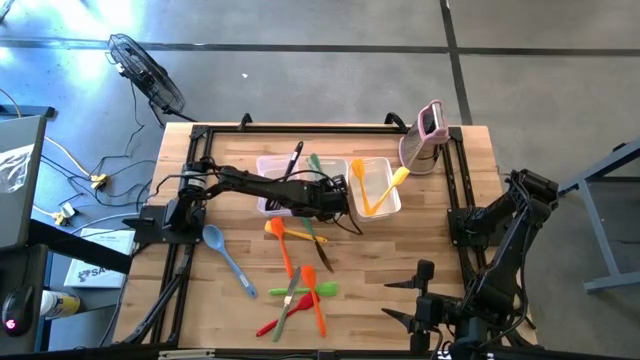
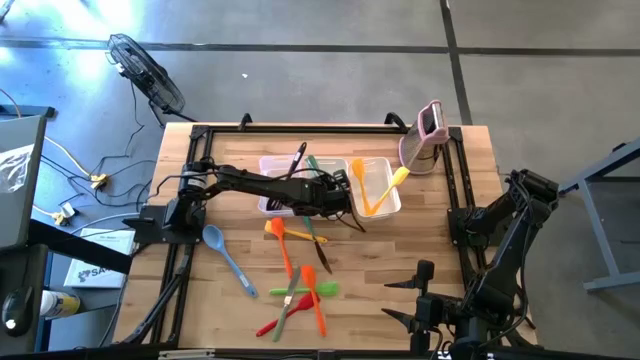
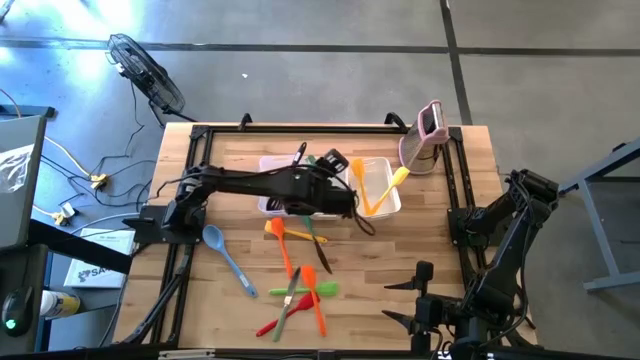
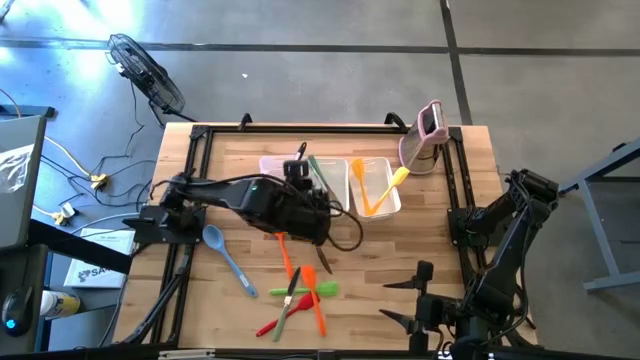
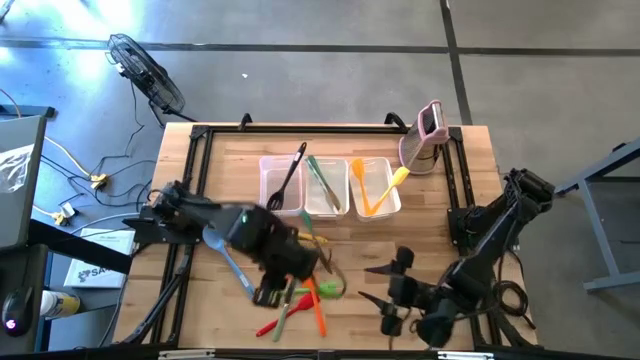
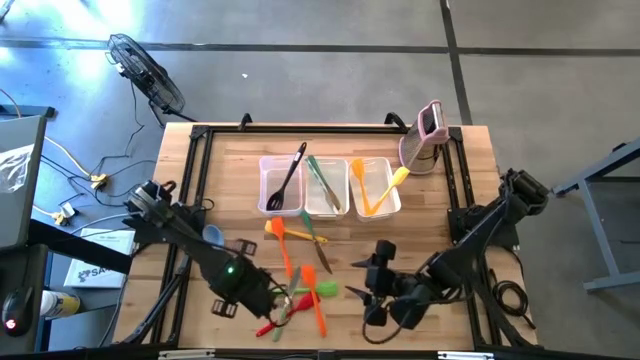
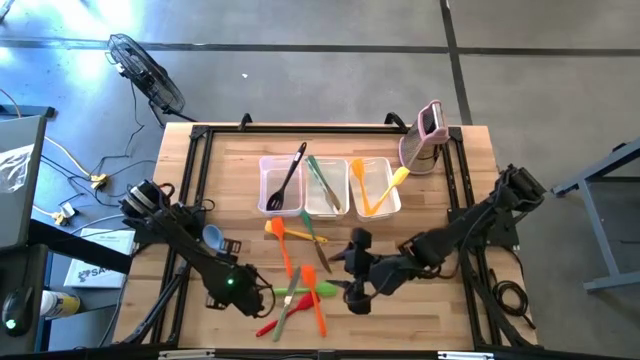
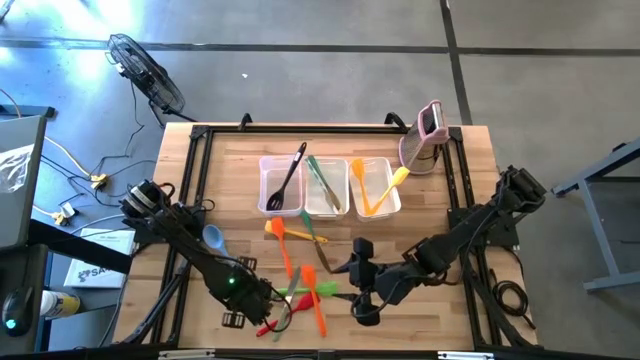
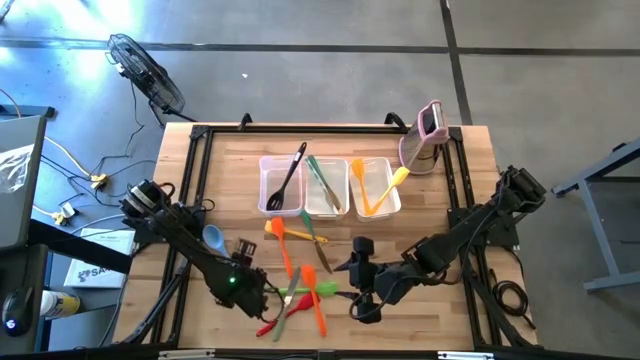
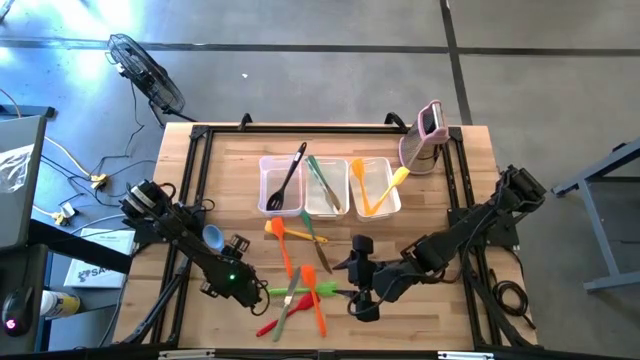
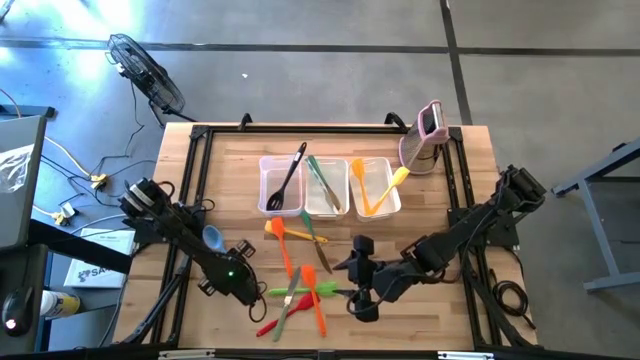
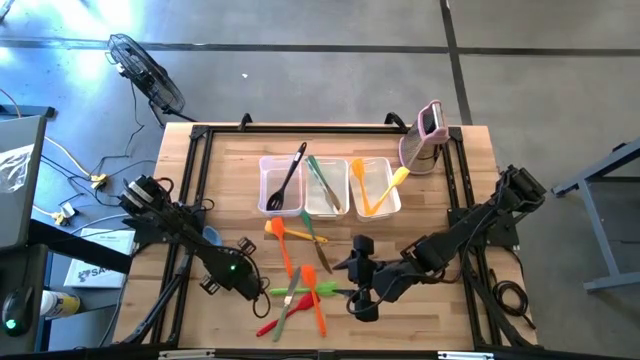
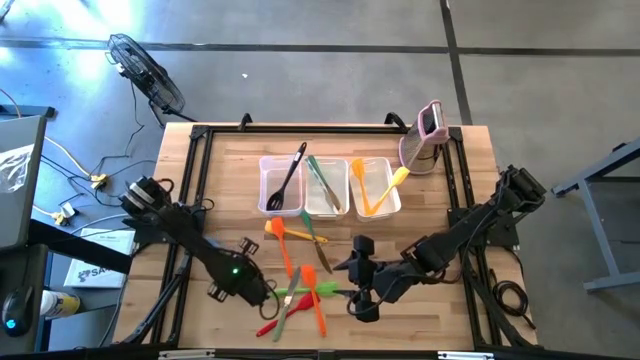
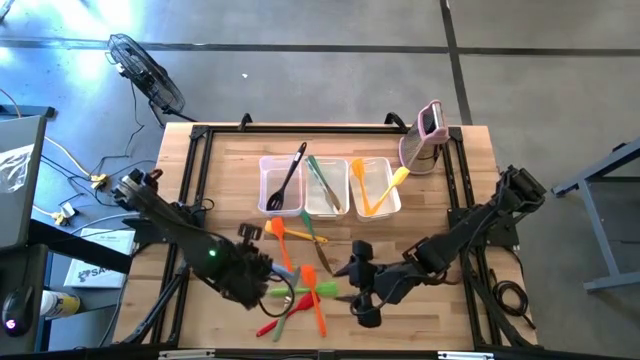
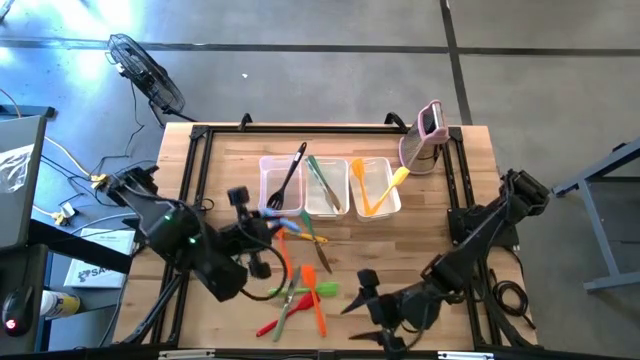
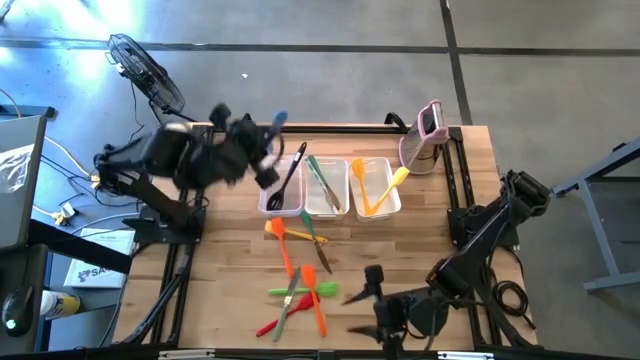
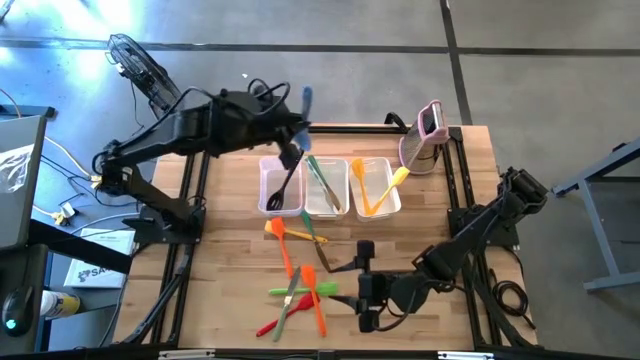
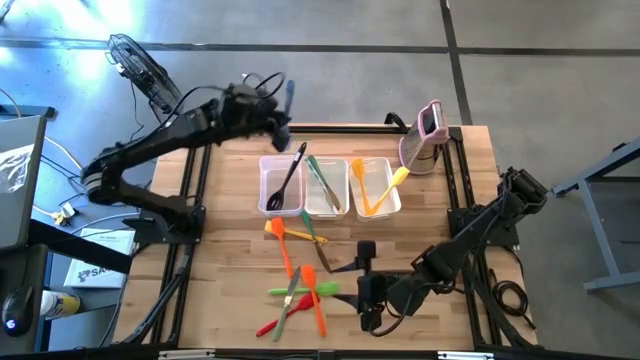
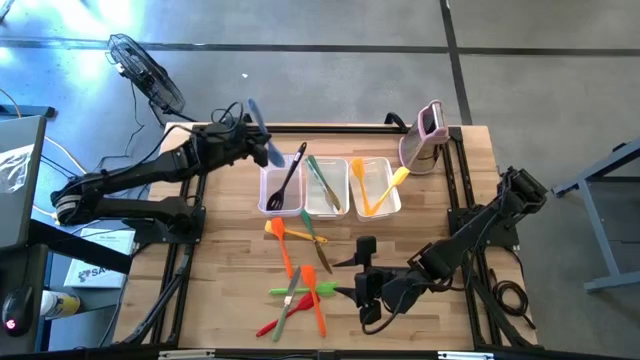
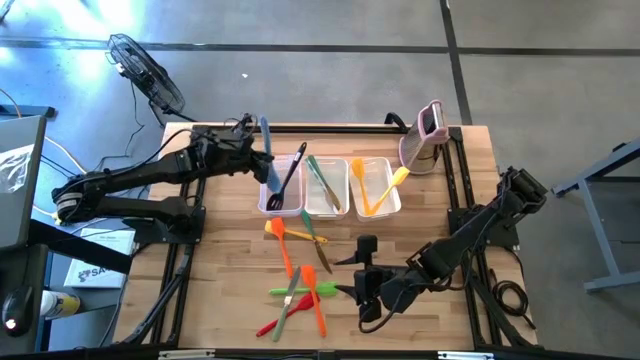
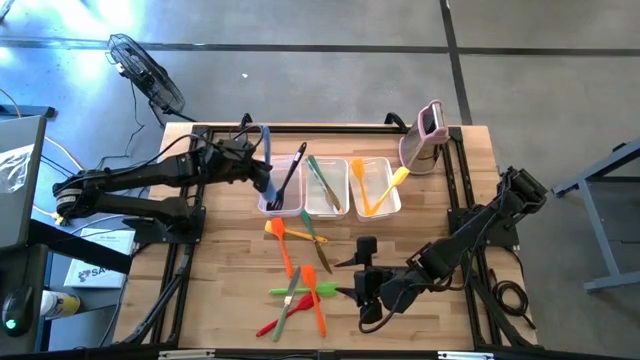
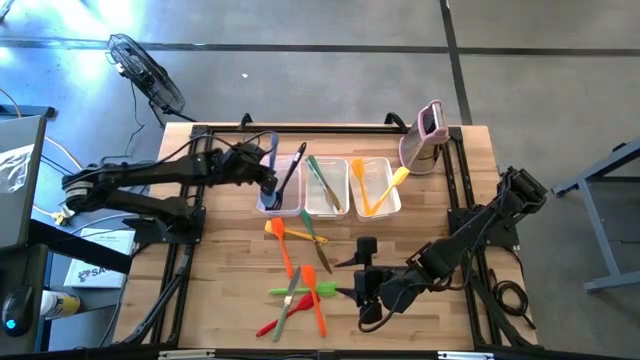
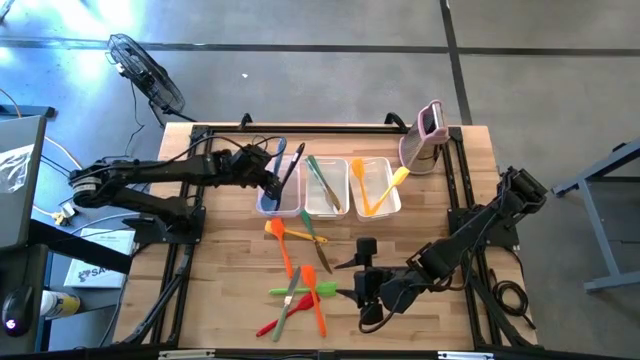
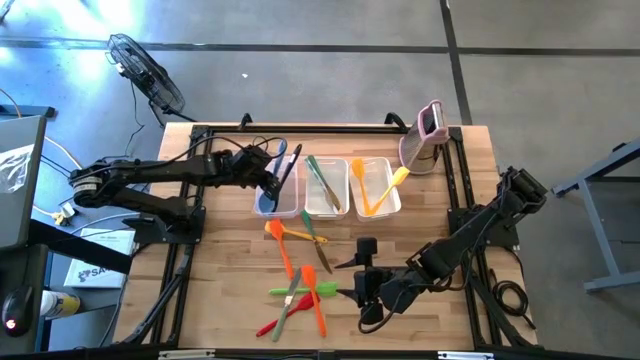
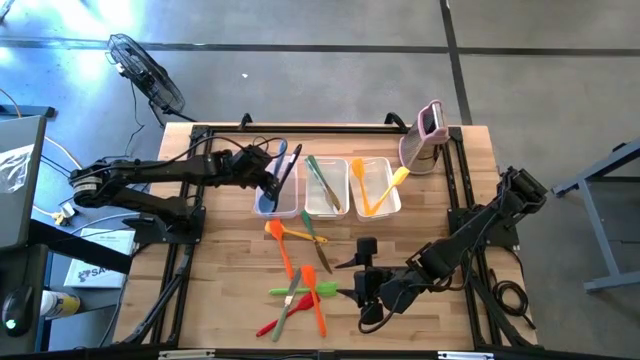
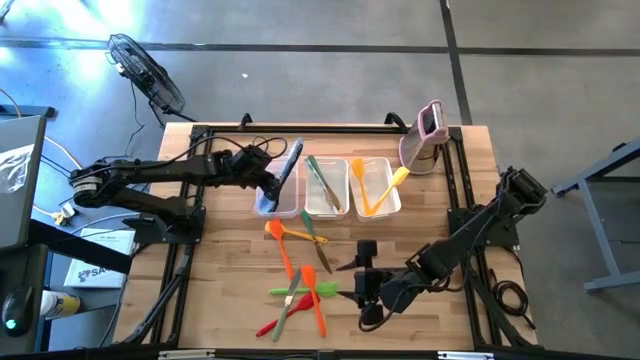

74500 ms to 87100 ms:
Task: Pick & Place Kitchen Items
Put the blue serving spoon into the transparent bin

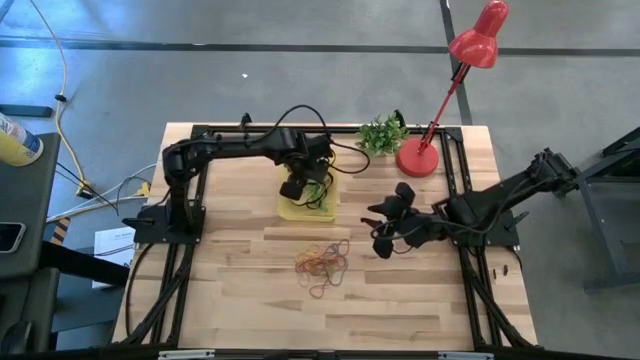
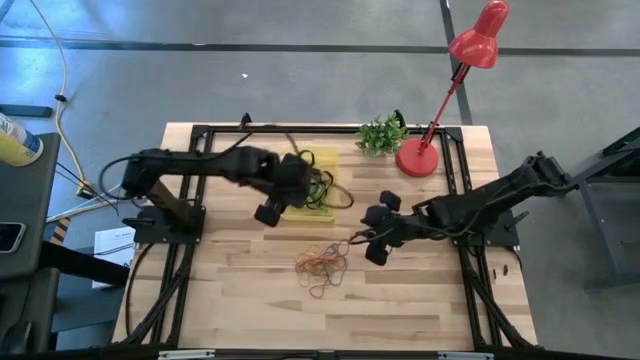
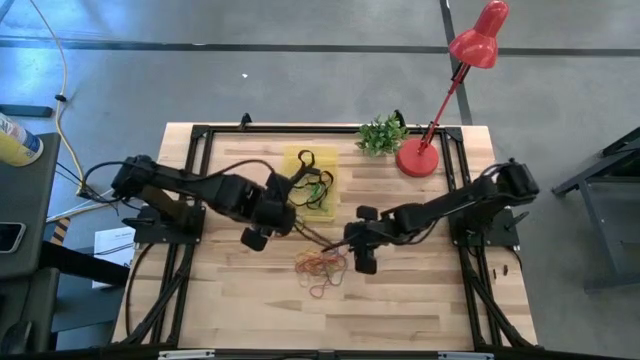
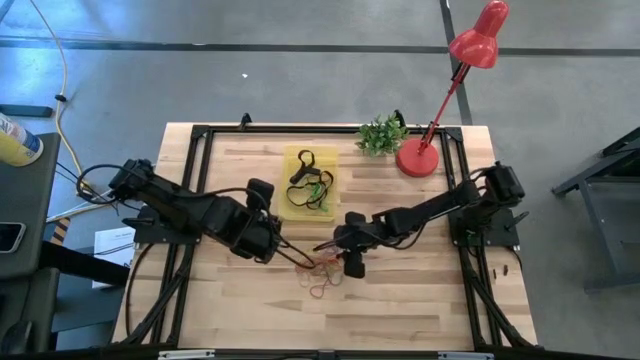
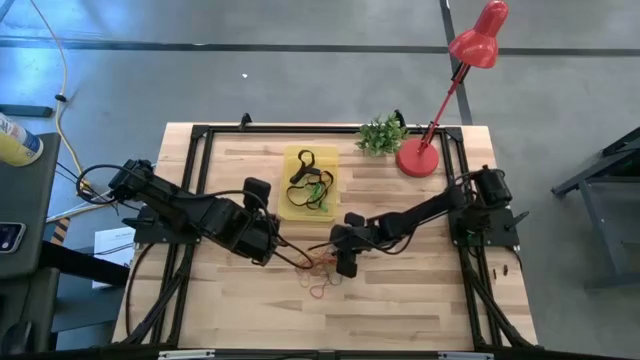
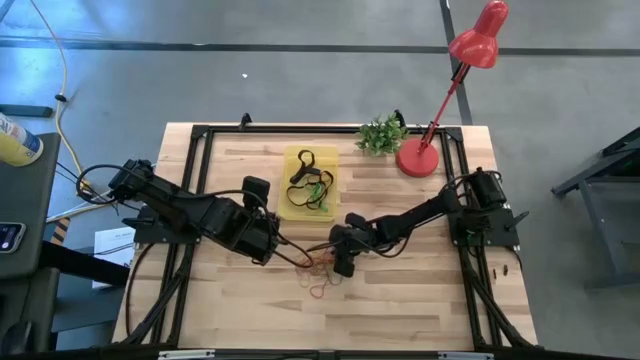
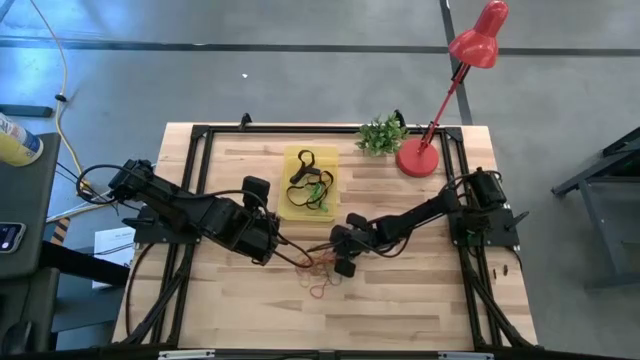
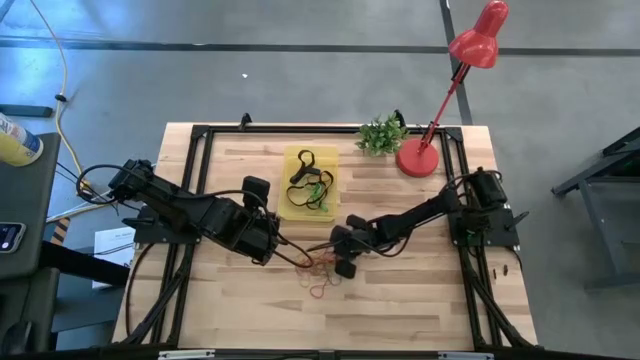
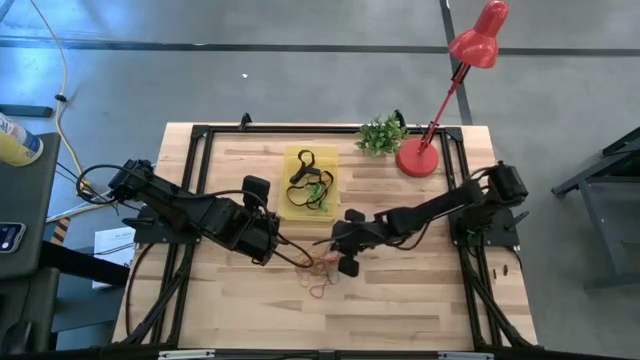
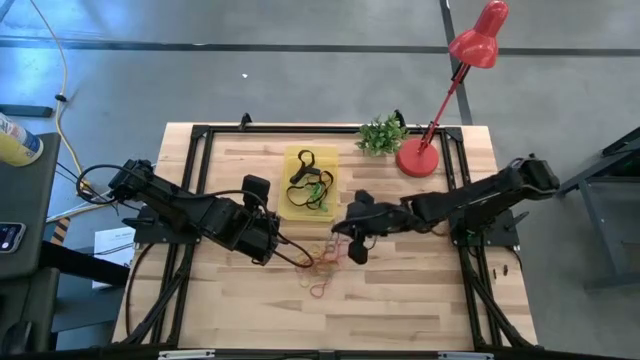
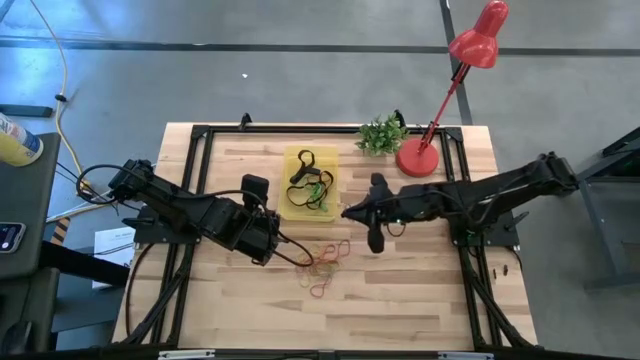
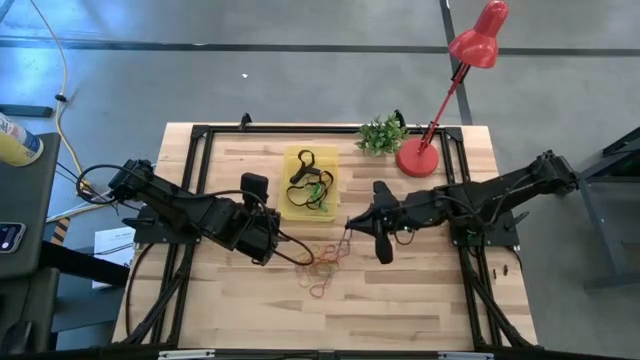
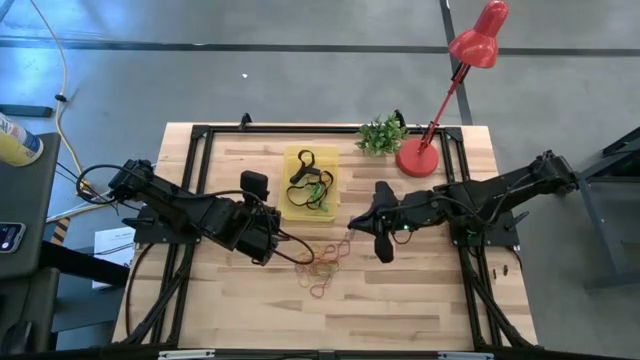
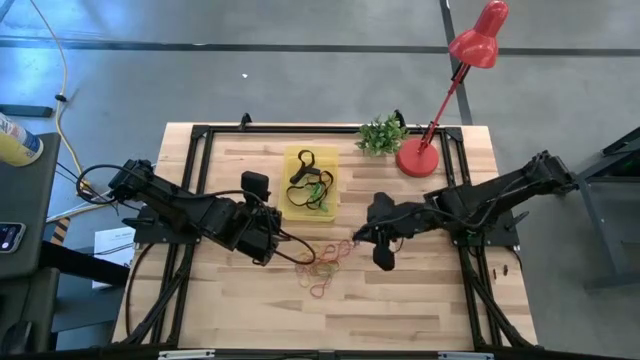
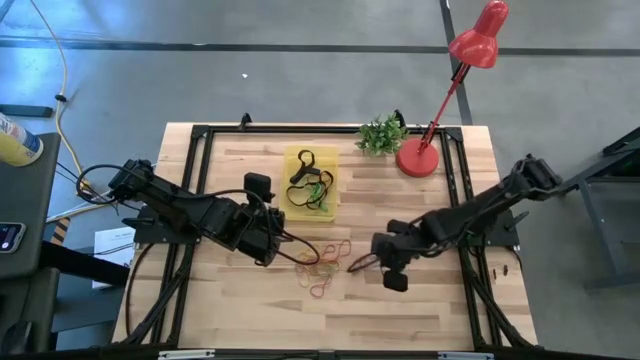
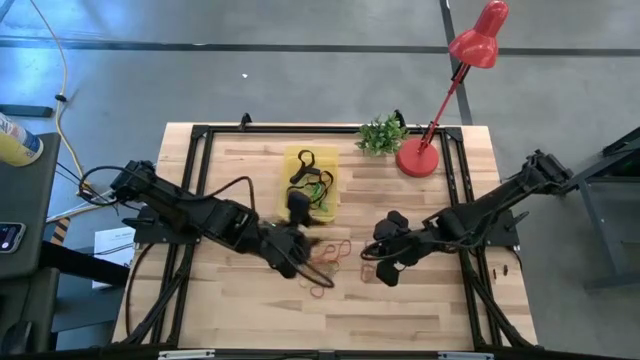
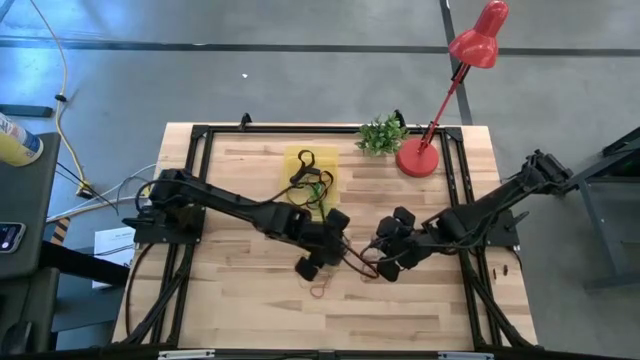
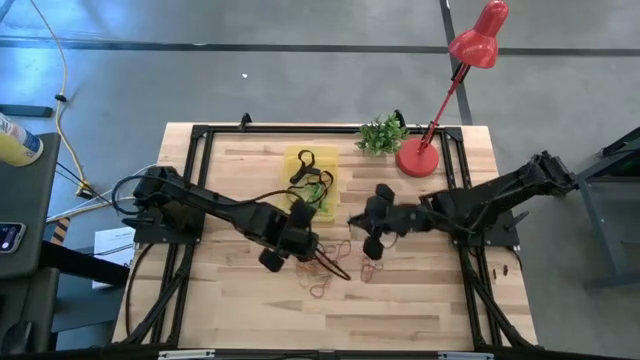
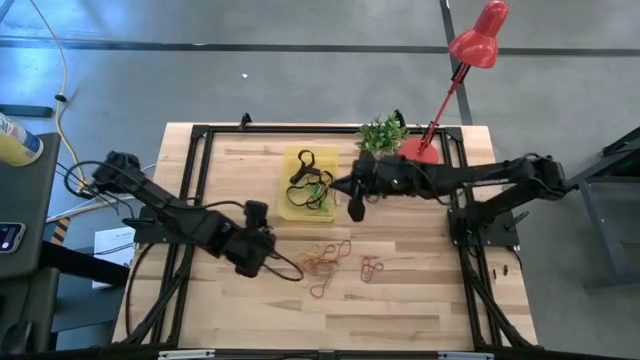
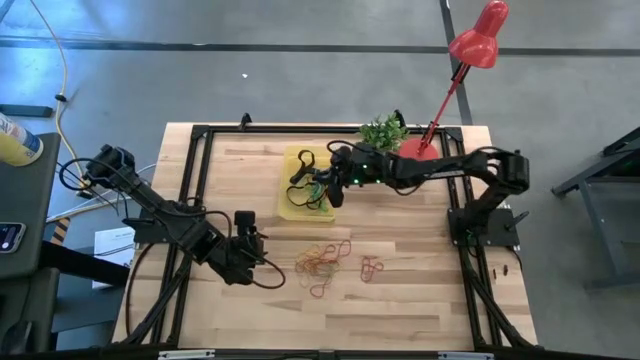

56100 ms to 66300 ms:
Task: Pick and place rubber bands into bin
Put the blue rubber band into the yellow bin
